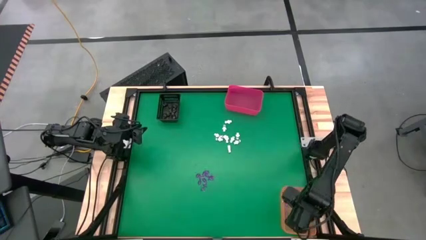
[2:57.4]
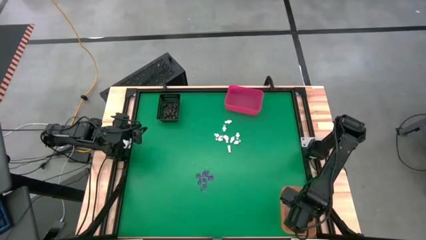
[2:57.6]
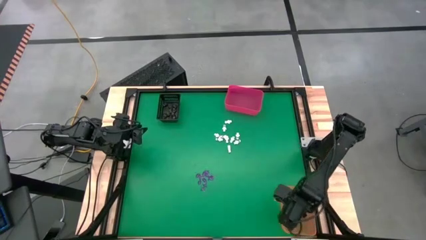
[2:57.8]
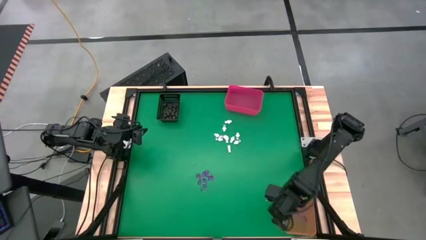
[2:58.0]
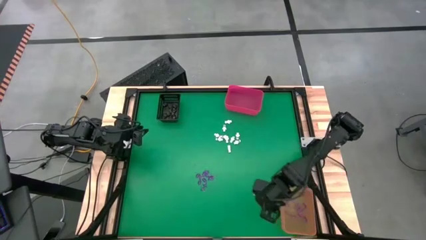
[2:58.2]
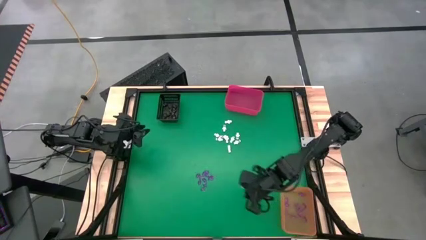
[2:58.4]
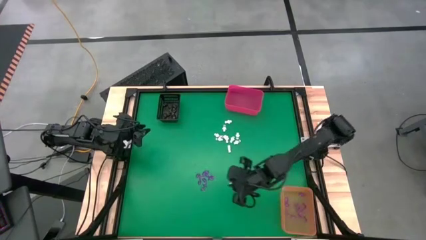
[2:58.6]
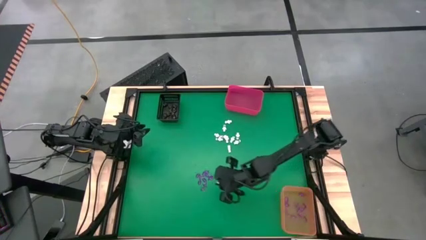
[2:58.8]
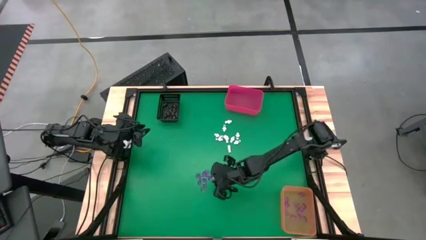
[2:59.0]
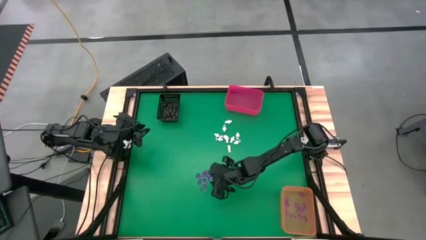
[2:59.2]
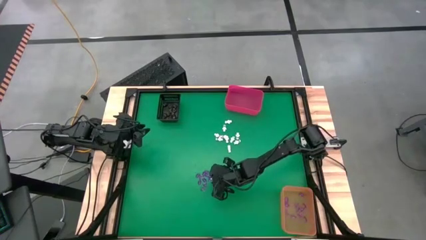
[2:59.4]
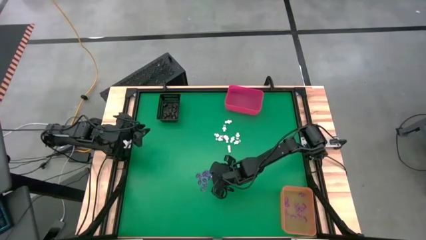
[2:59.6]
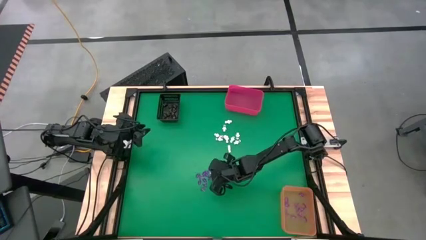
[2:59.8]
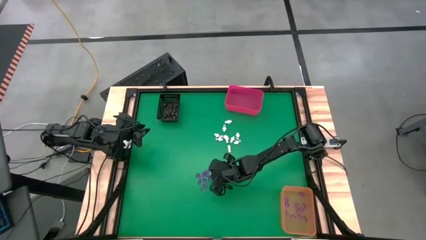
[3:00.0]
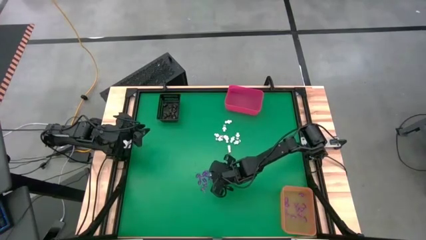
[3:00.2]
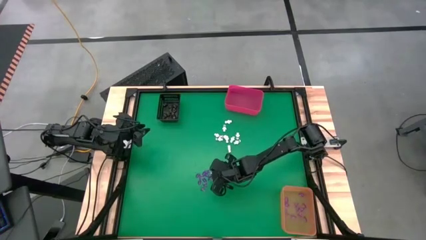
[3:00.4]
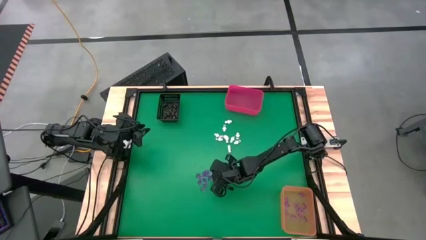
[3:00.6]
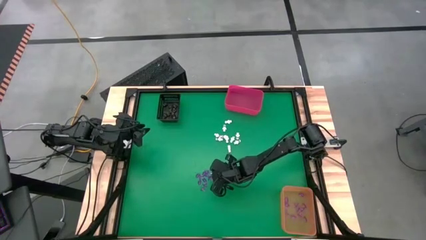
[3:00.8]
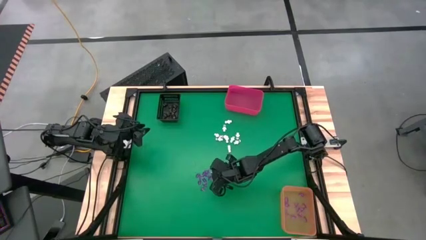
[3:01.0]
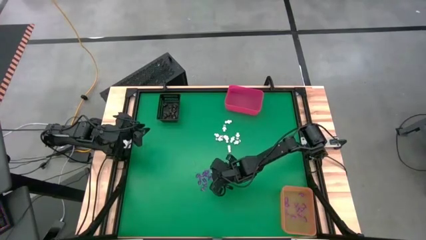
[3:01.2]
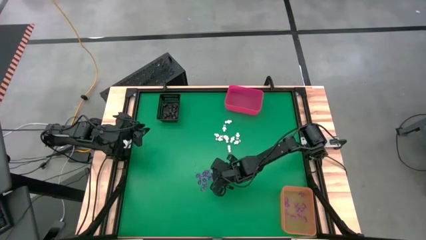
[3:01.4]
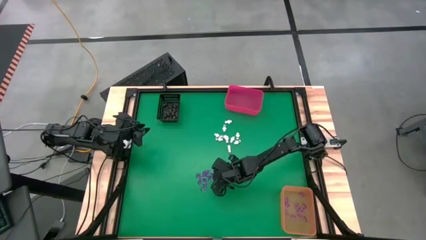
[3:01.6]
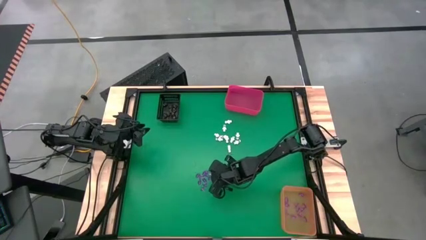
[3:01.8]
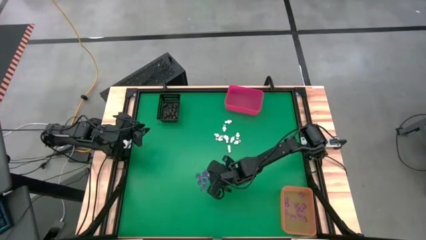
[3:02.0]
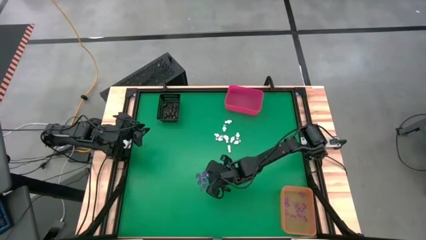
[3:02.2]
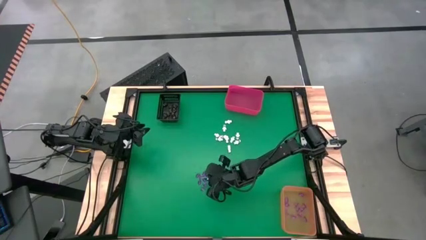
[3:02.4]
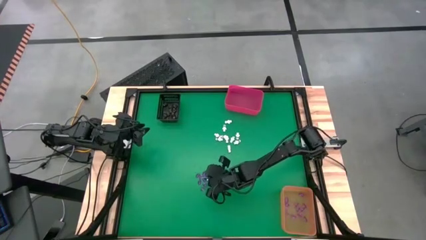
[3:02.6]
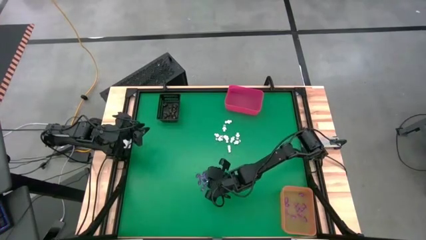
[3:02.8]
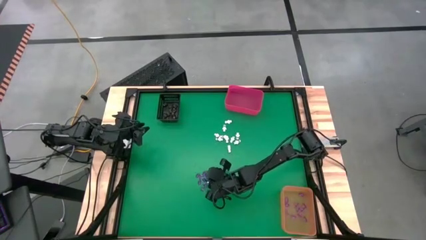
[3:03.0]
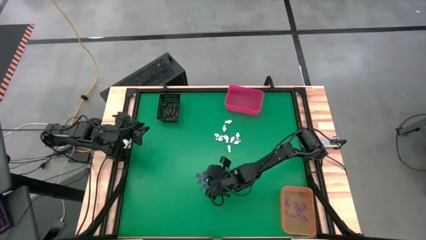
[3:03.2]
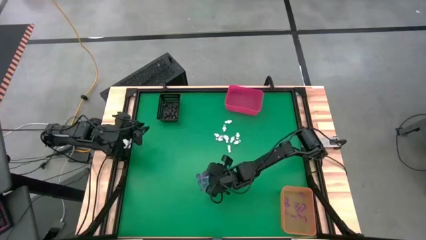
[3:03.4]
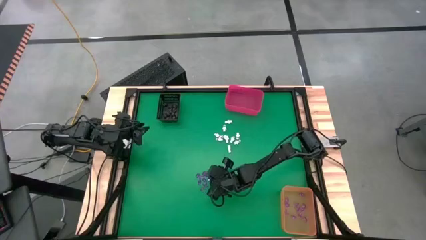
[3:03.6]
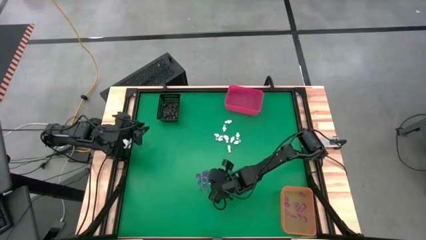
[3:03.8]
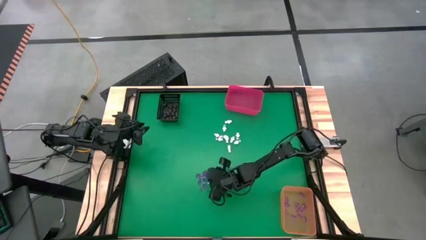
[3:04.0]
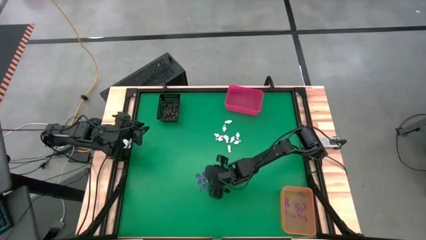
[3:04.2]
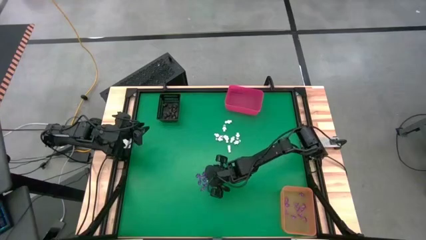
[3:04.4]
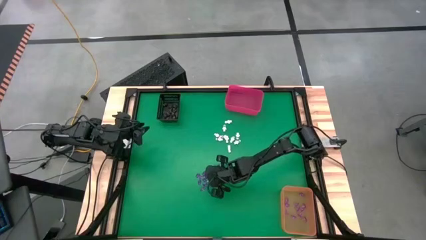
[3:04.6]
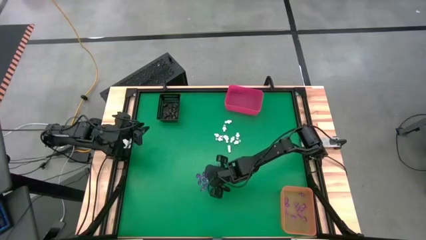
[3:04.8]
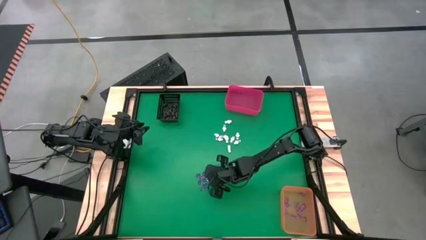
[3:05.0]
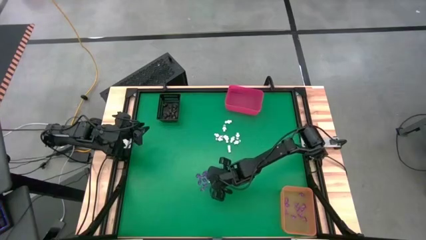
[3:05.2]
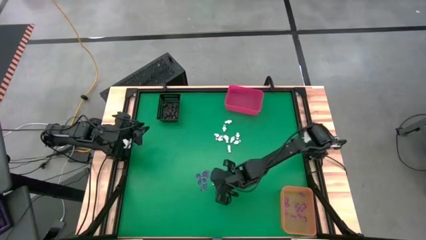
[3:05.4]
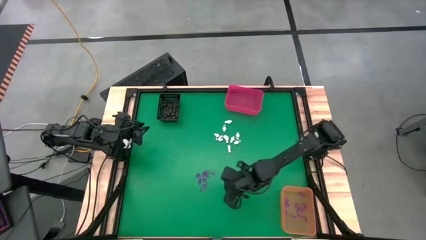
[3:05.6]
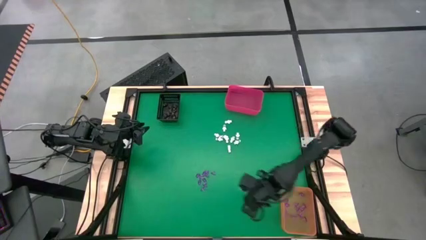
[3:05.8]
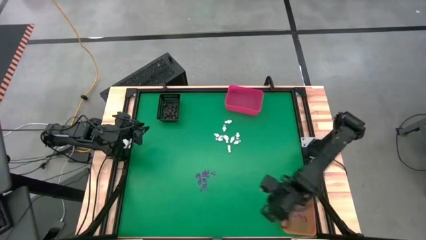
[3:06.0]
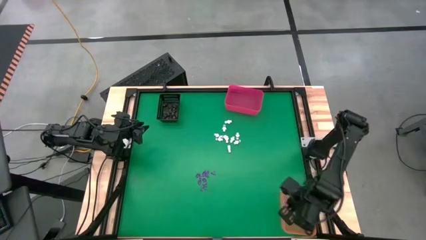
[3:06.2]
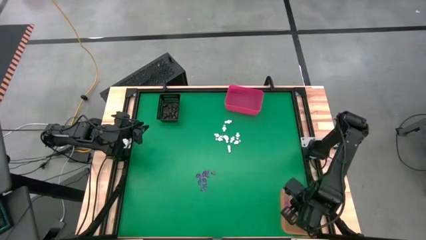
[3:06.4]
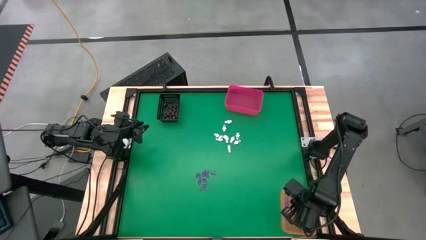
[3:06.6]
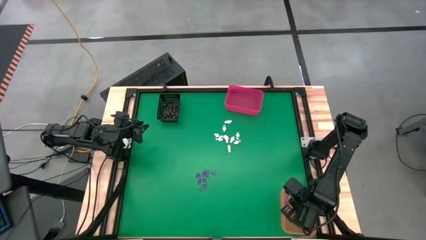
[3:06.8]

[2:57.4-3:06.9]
Task: Sort Halloween decoration
Put the pink witch hat toy into the orange bin

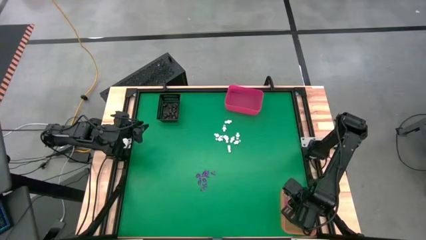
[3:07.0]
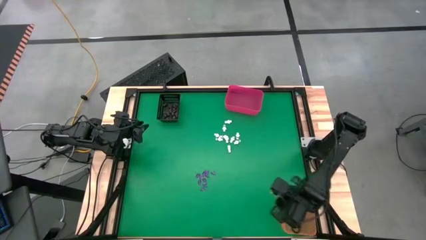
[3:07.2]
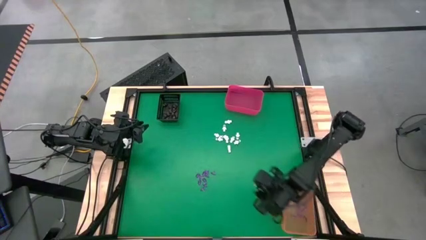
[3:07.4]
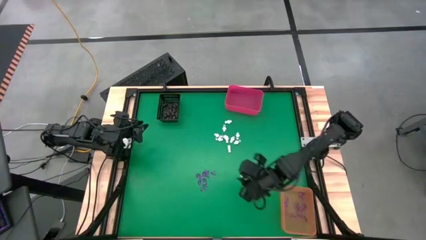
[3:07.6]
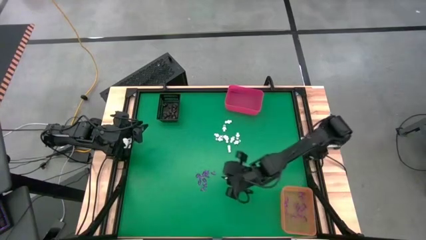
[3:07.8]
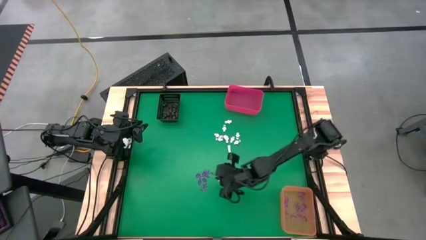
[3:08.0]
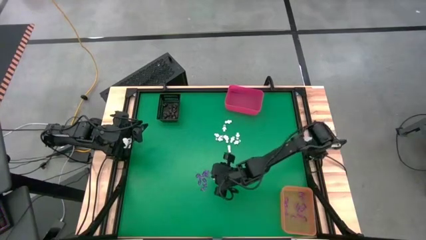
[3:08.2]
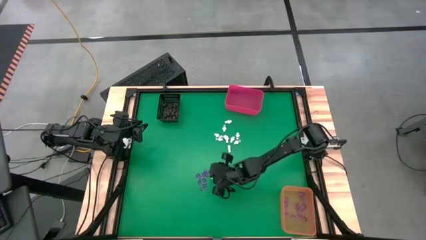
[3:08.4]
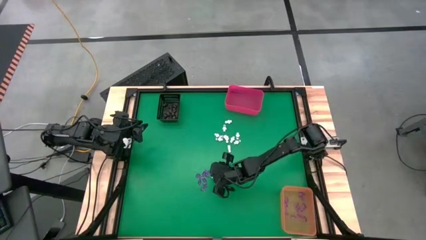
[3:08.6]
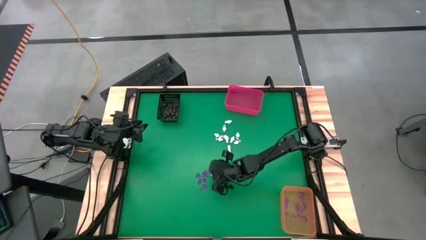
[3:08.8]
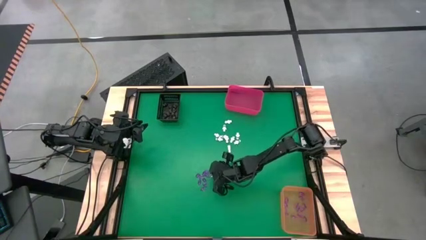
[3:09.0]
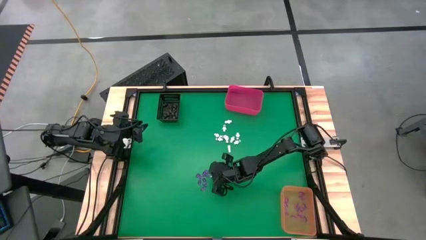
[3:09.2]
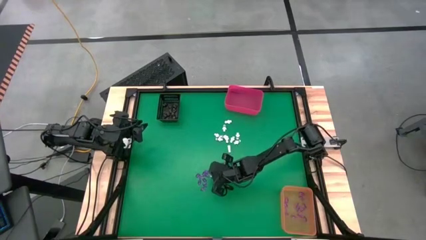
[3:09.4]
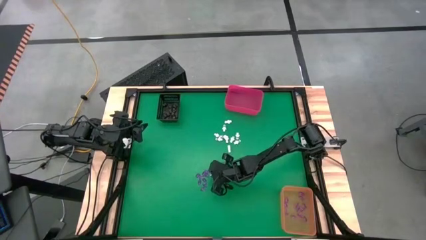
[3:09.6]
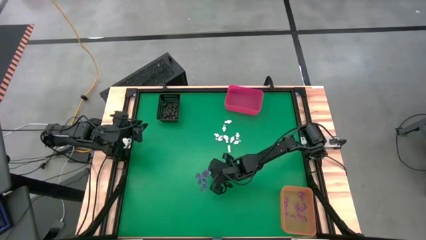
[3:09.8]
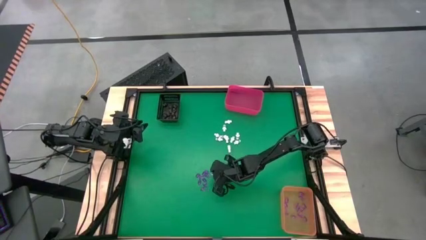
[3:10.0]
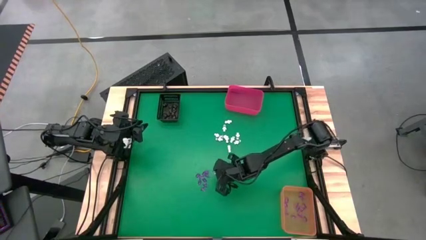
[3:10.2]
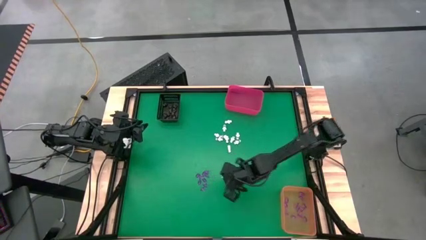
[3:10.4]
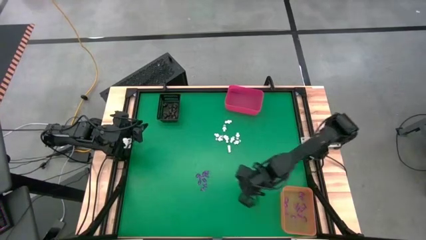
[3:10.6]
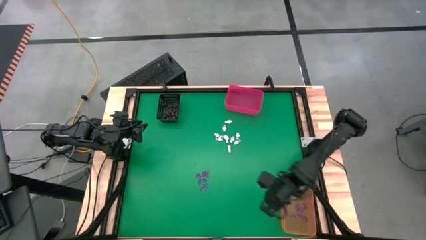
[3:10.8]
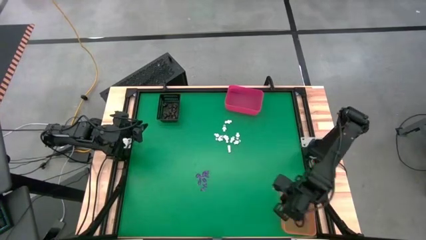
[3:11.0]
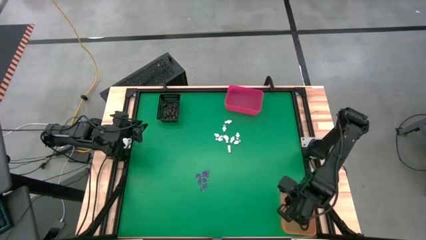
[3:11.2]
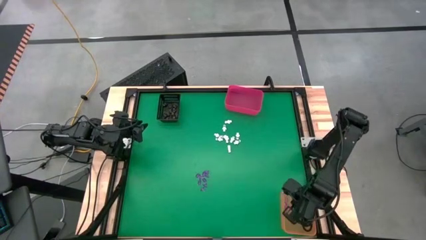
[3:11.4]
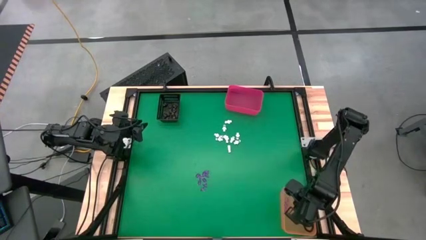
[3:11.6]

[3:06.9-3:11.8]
Put the pink witch hat toy into the orange bin

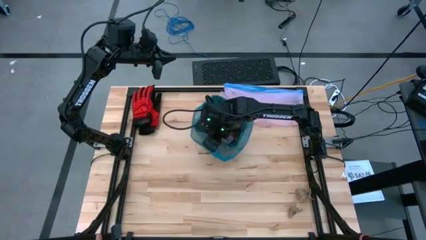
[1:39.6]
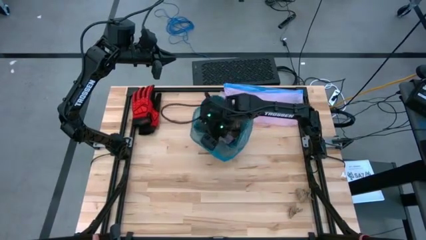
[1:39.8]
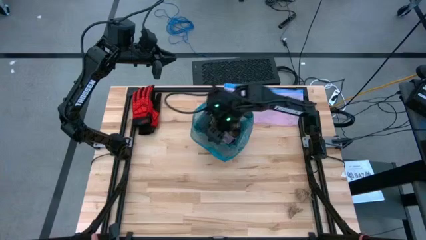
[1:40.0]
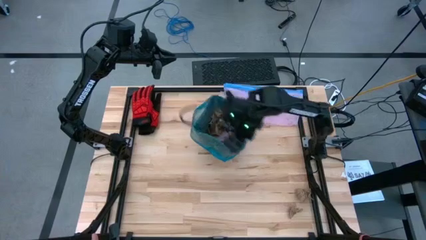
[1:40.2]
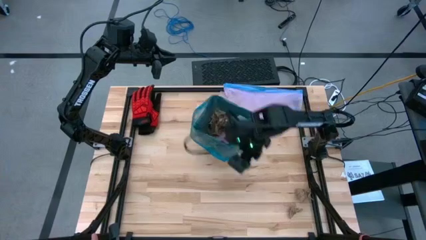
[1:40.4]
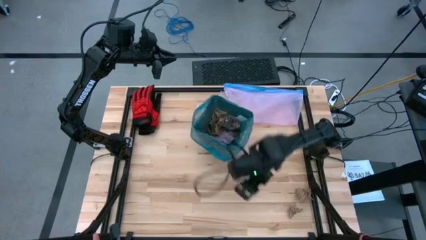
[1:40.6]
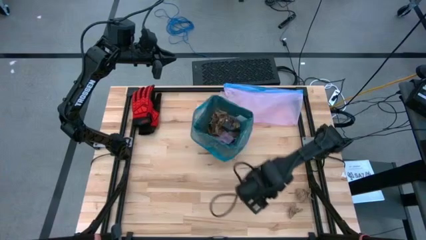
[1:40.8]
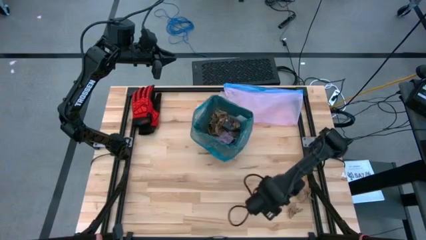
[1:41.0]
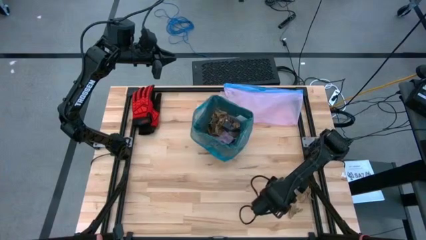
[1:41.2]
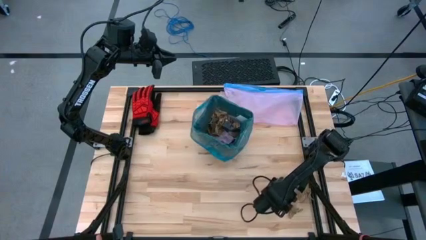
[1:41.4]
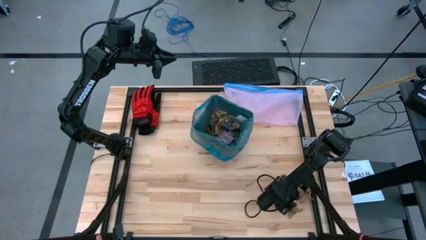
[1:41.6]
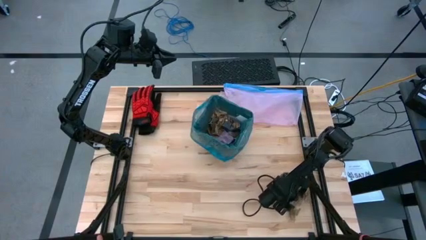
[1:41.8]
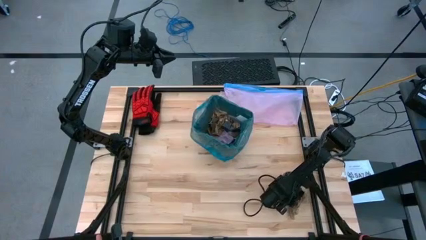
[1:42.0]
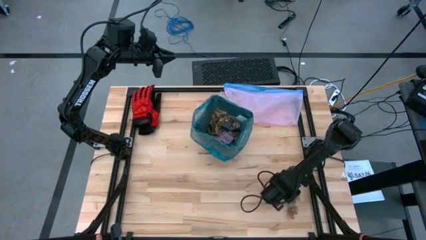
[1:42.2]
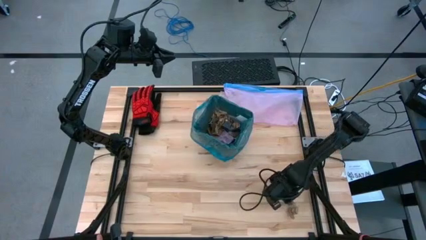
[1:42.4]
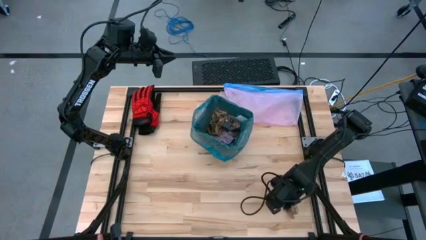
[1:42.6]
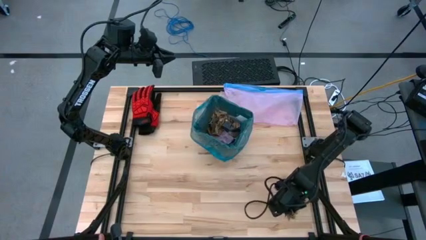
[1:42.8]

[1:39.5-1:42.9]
Task: place trash/remove bag and relplace
Put the brown napkin into the black trash bin
